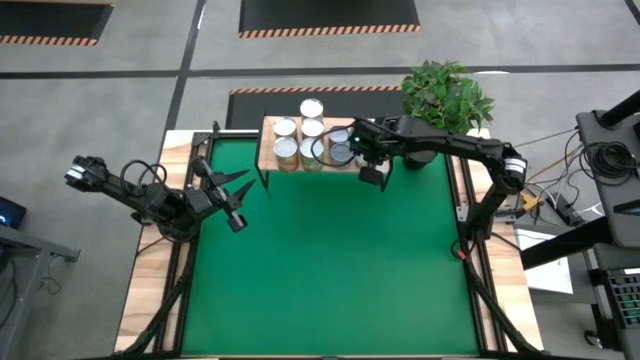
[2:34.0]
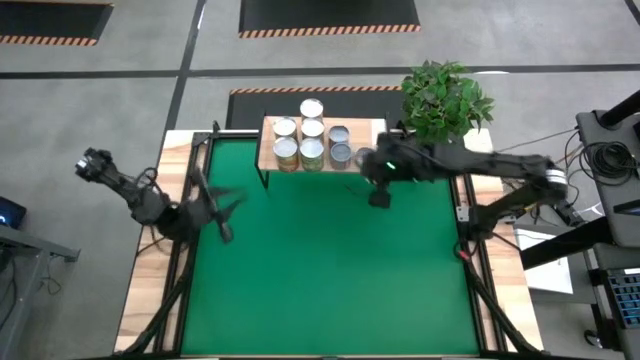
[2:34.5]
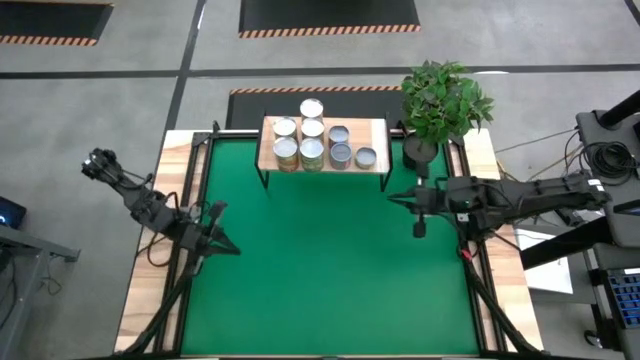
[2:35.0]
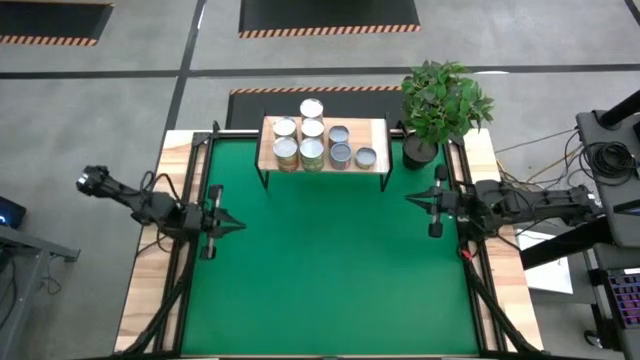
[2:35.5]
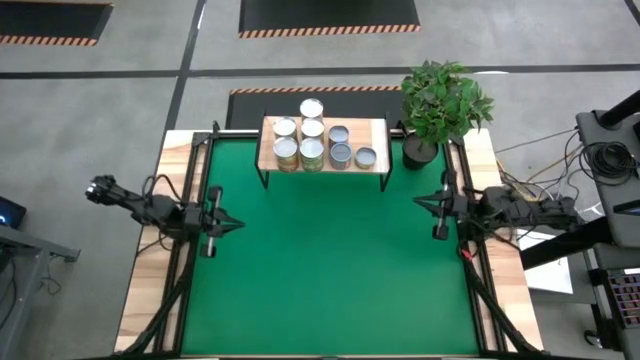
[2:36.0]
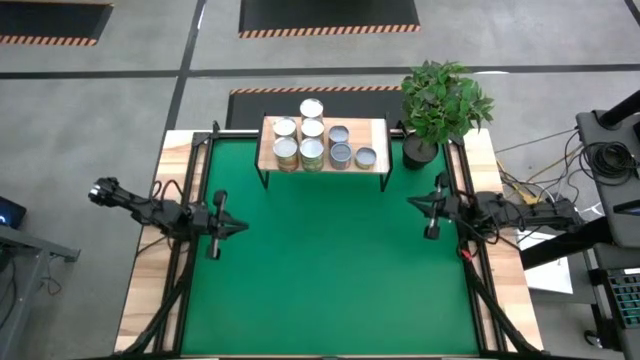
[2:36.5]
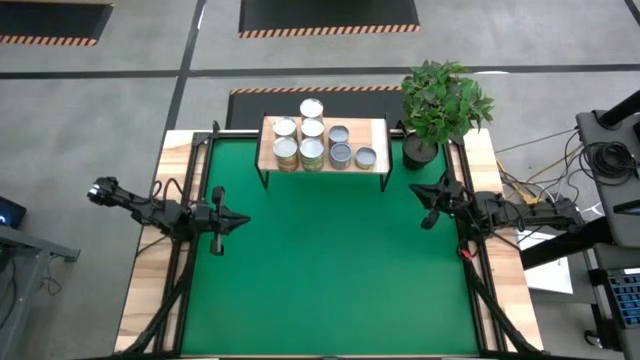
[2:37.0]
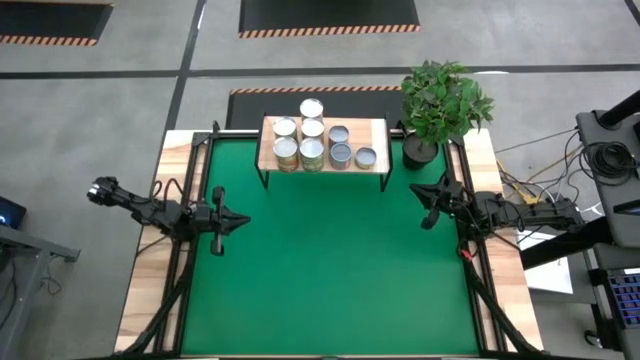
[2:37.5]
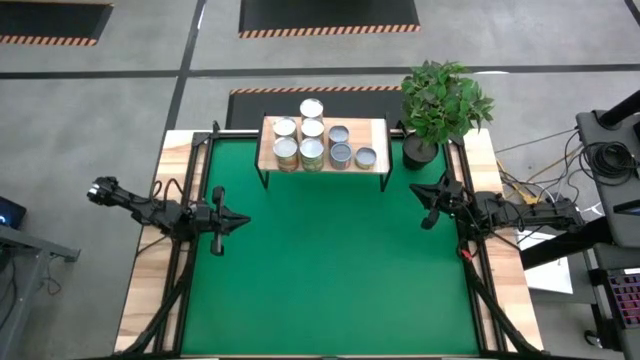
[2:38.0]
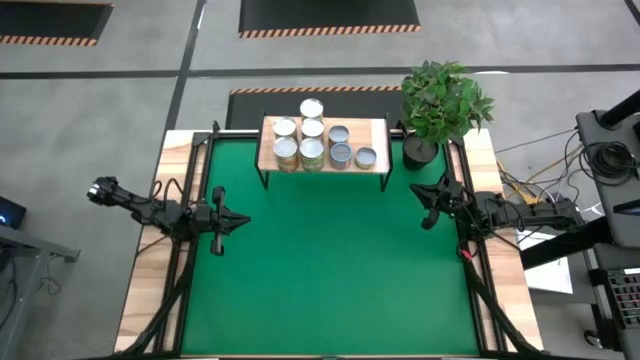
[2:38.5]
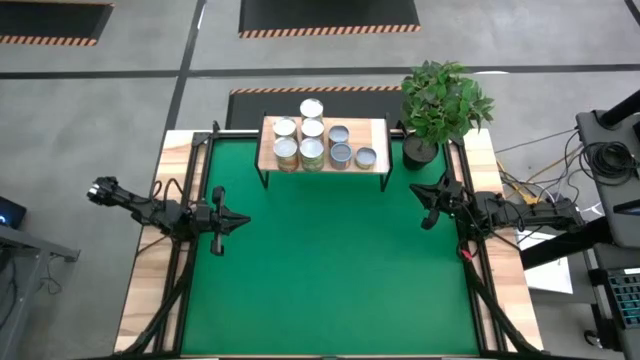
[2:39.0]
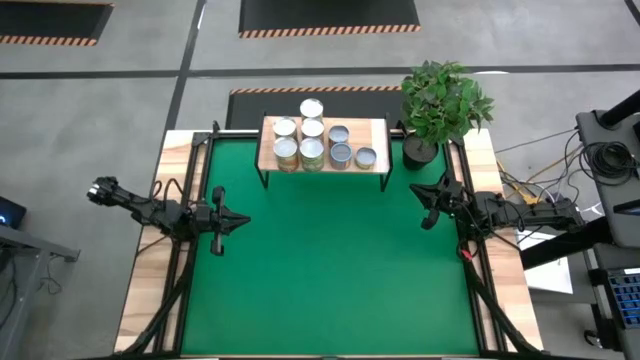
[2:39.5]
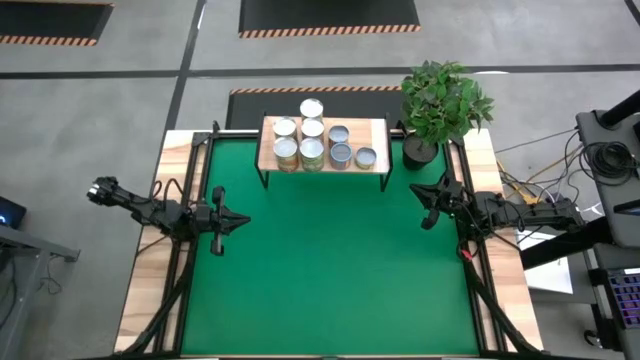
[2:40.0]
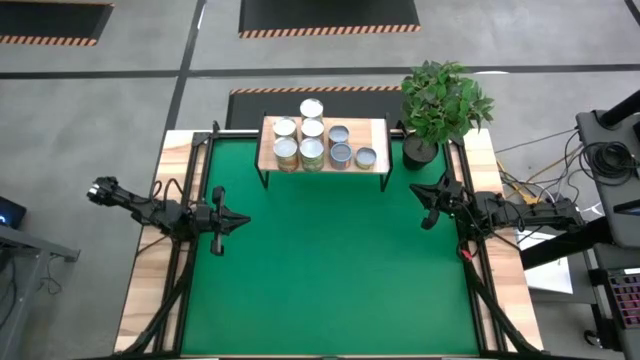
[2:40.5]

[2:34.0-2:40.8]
Task: Pick and place cans onto a shelf
Return to Home Position

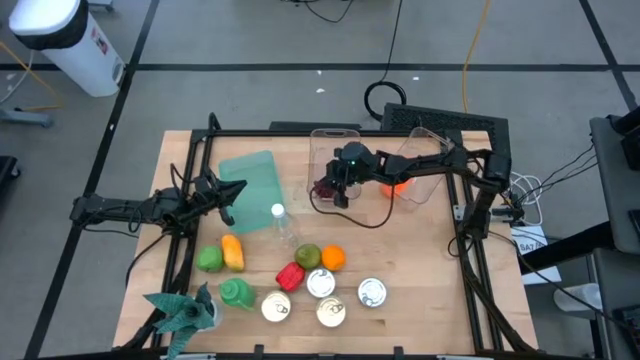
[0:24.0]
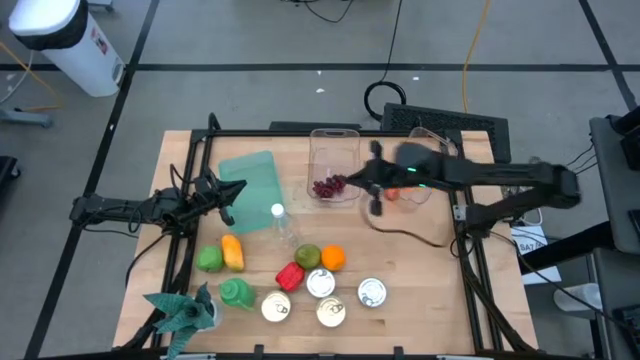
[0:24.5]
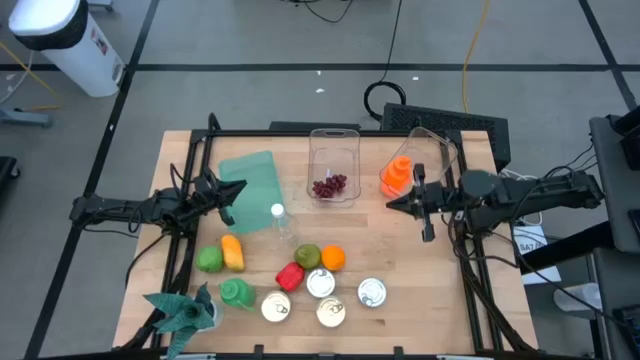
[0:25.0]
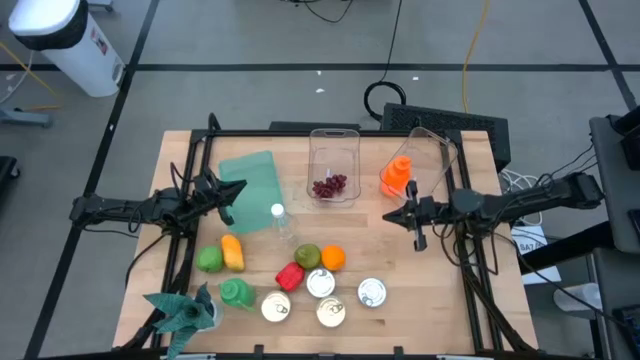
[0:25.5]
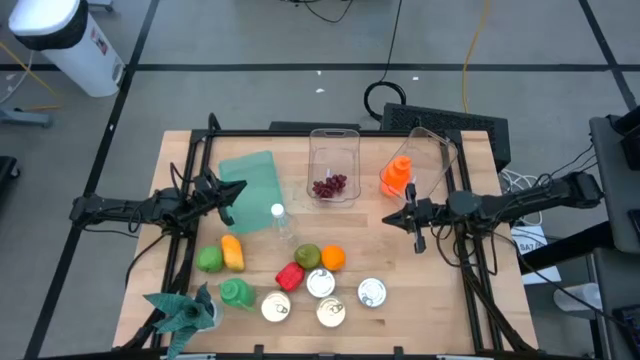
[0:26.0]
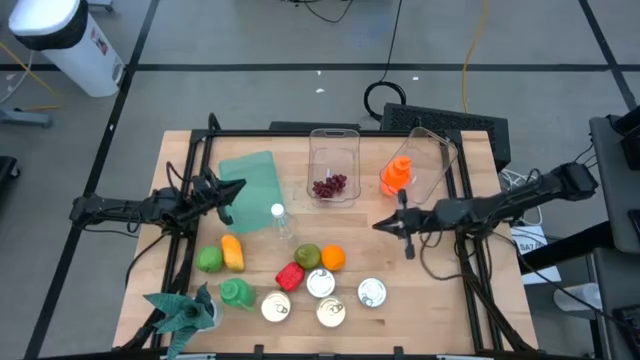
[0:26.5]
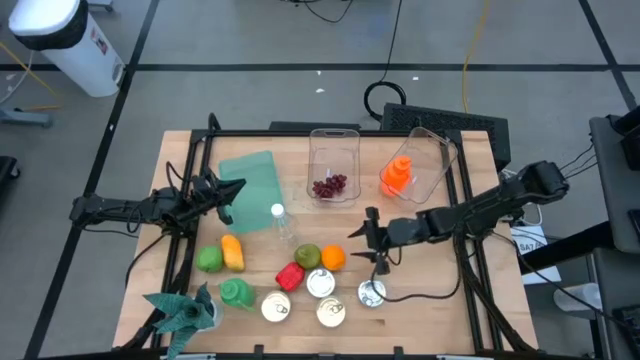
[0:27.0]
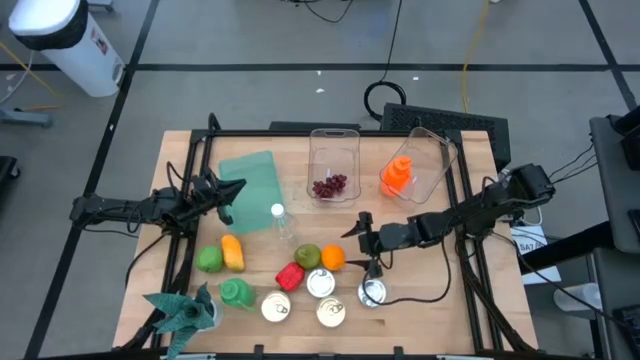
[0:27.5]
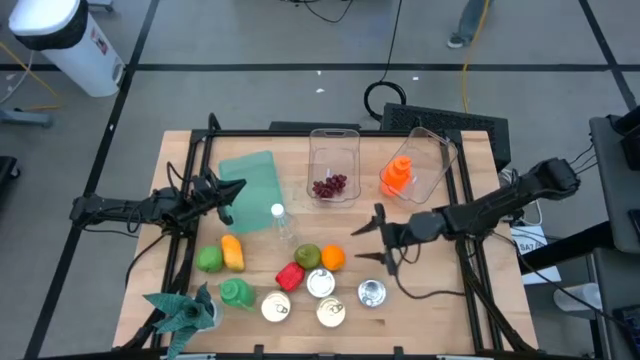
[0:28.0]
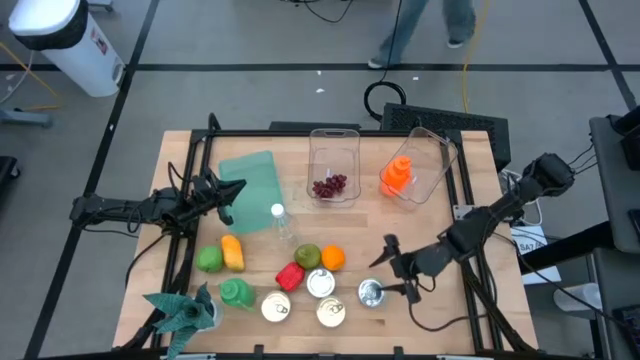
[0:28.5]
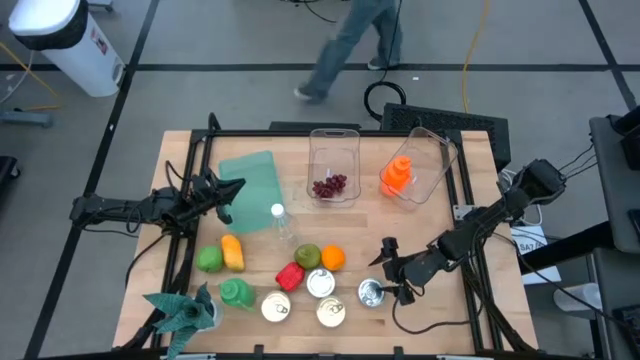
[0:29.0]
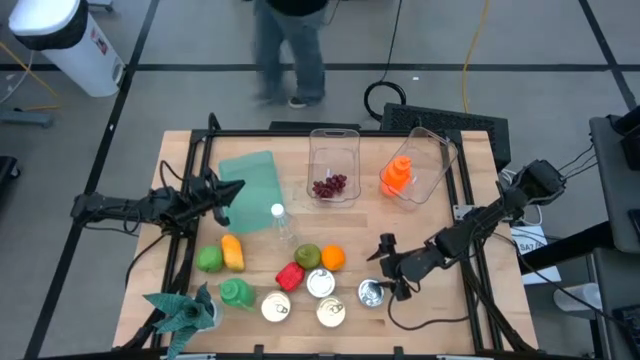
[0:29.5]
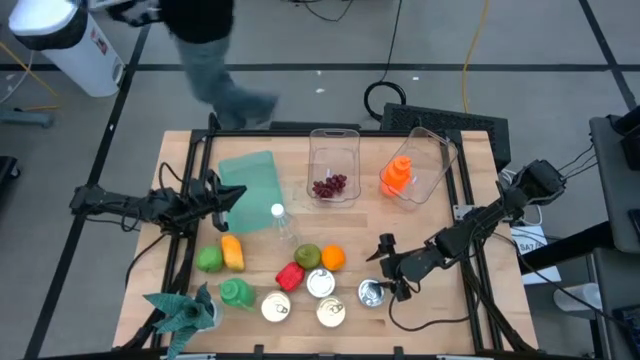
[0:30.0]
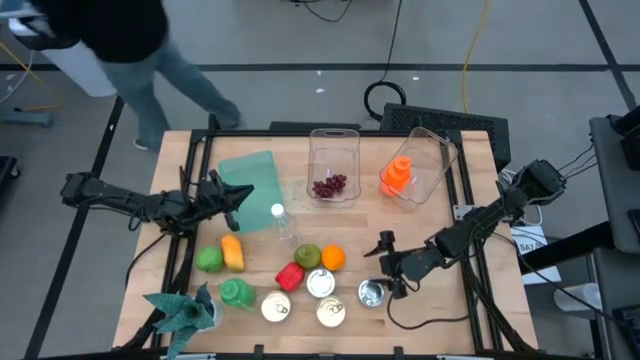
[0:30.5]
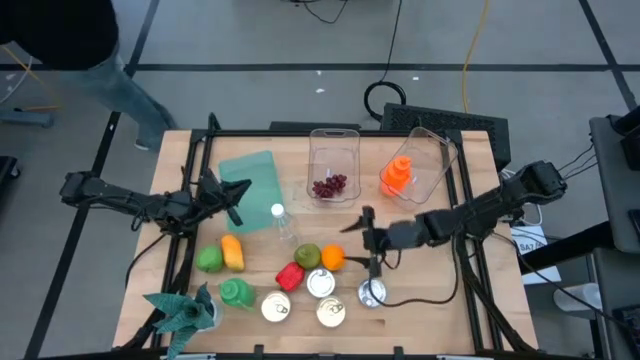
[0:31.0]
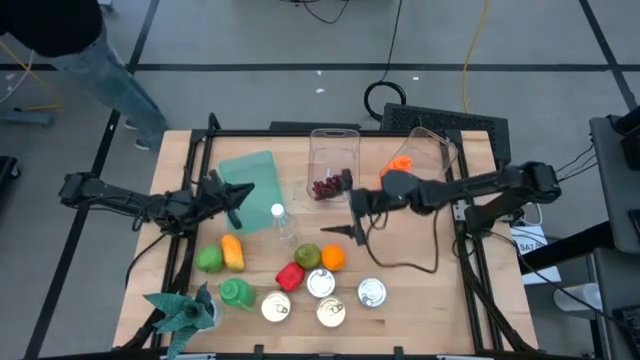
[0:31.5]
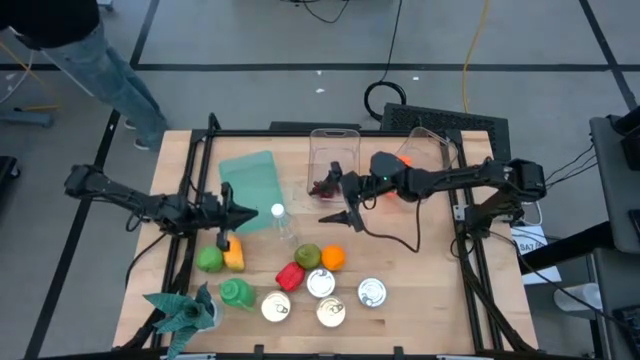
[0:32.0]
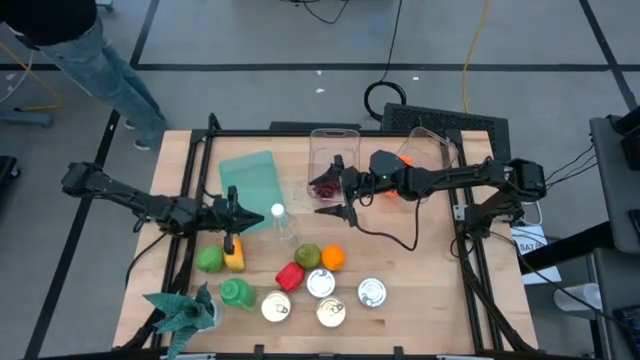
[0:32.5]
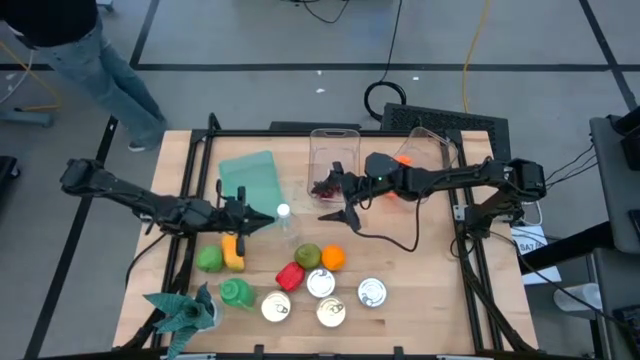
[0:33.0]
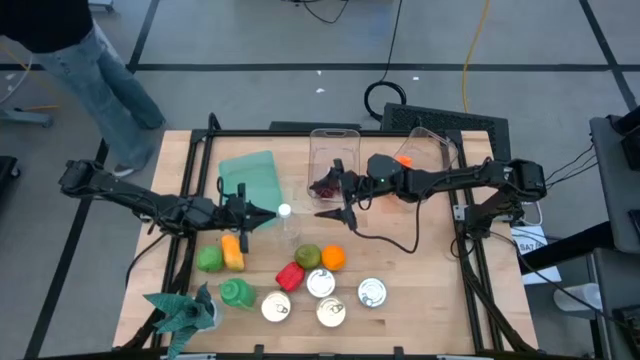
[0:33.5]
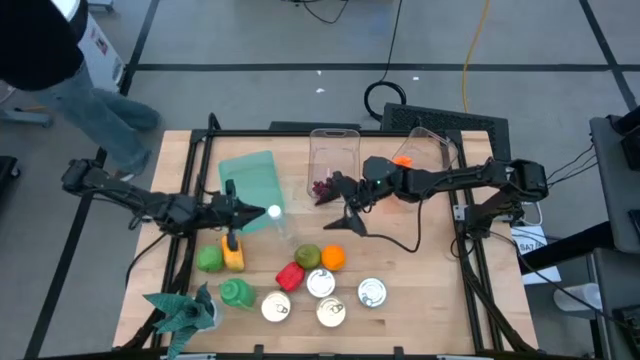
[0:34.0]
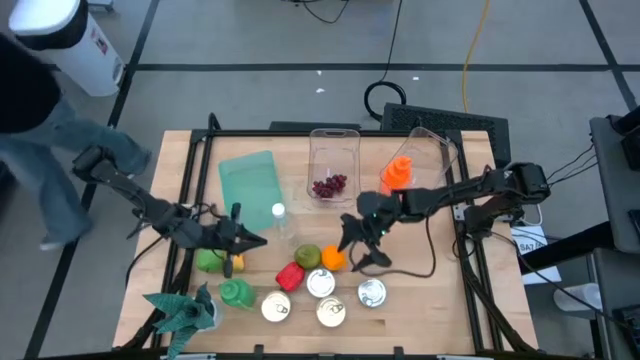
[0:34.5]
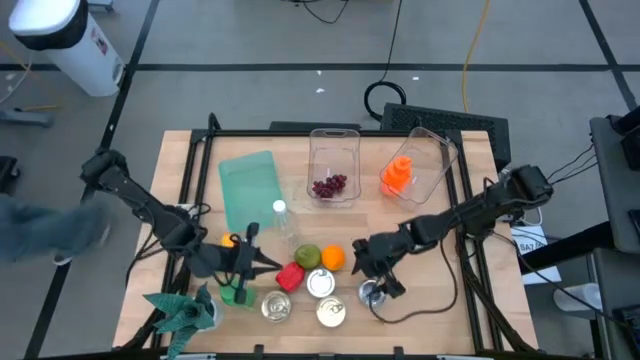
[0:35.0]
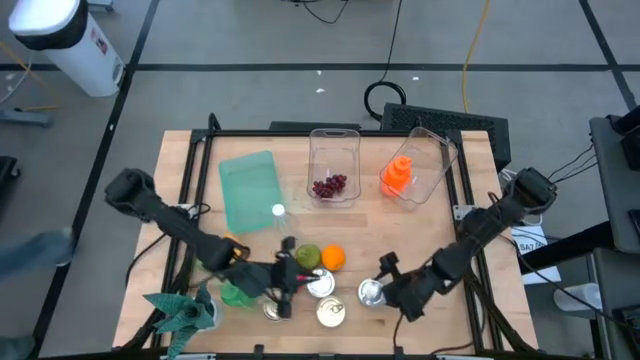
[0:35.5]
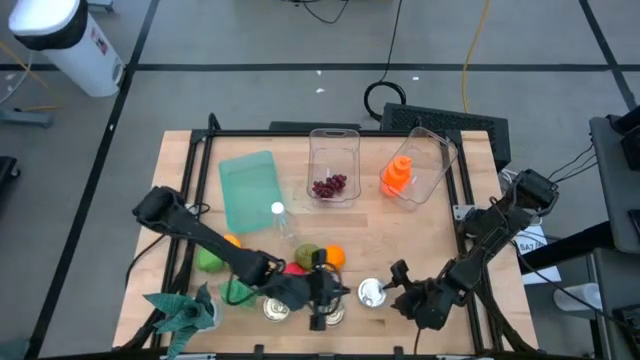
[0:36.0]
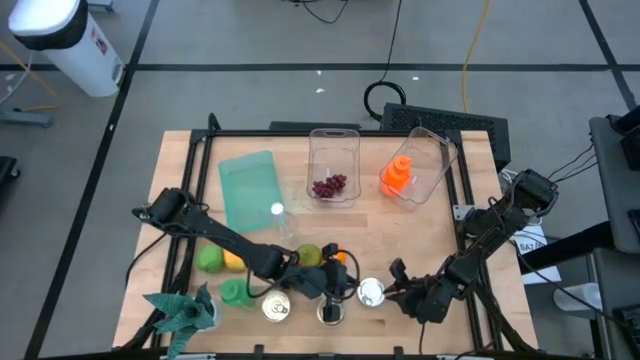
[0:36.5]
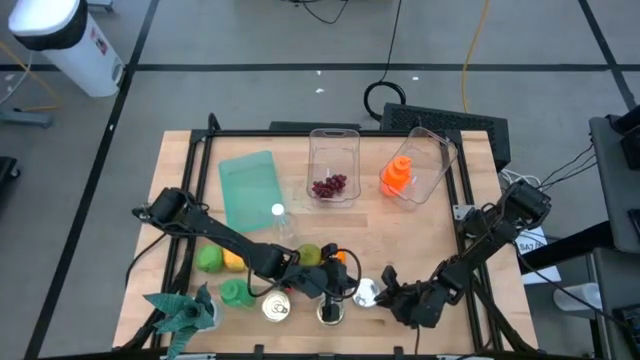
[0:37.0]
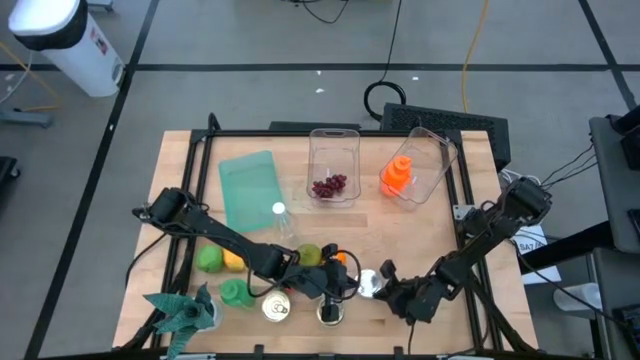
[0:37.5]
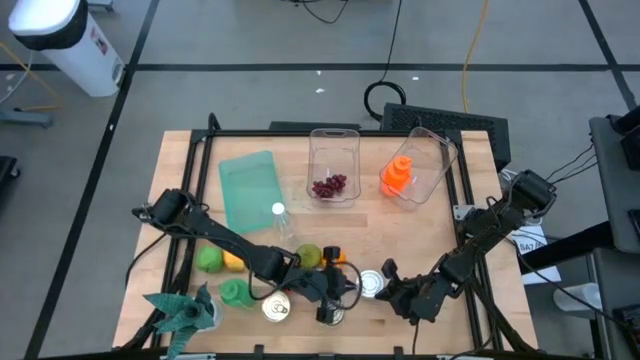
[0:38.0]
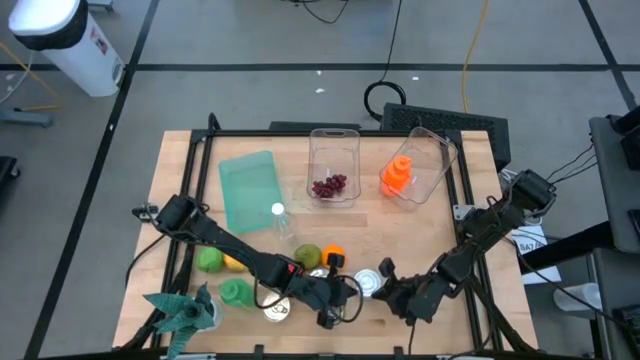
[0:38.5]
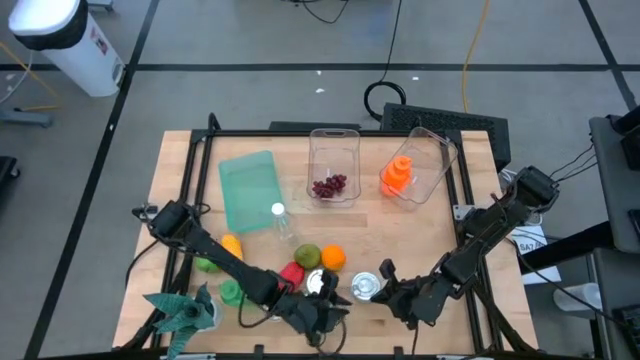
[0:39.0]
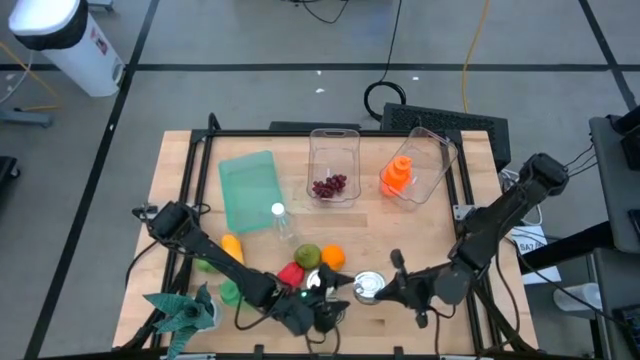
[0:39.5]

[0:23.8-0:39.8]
Task: Pick & Place Food Item
Put the right green tuna can into the green bin
